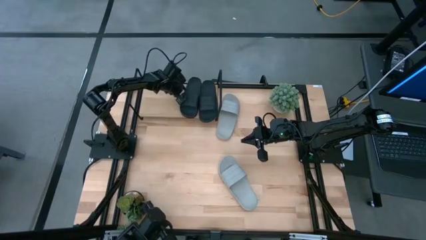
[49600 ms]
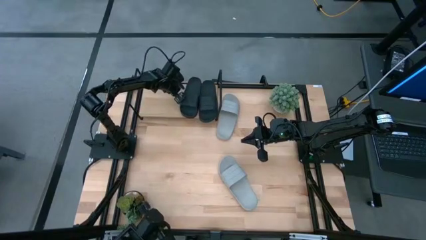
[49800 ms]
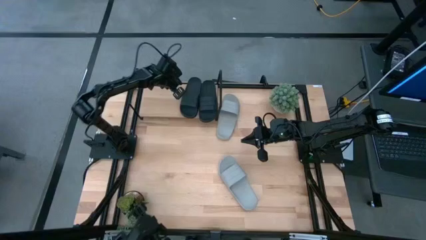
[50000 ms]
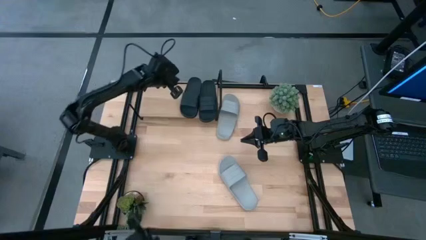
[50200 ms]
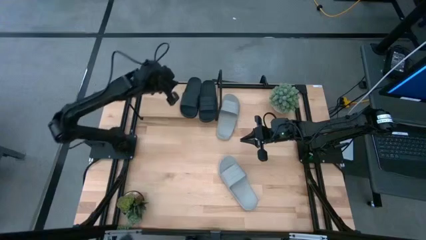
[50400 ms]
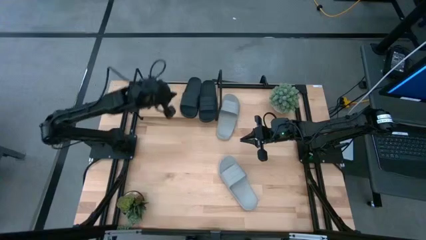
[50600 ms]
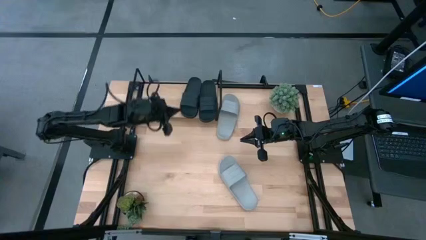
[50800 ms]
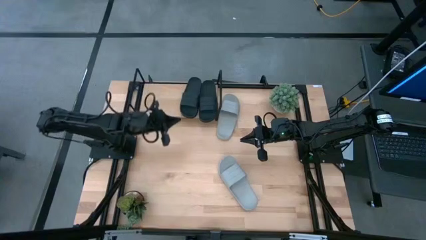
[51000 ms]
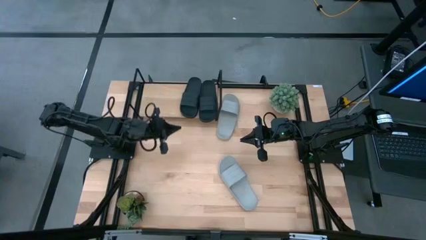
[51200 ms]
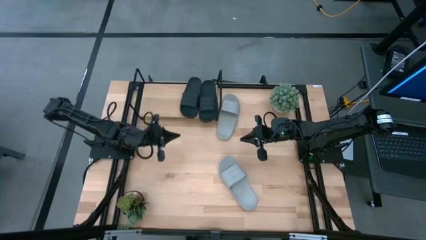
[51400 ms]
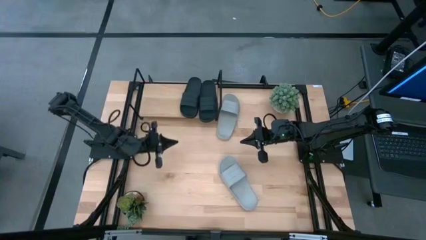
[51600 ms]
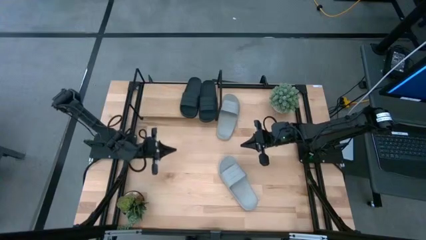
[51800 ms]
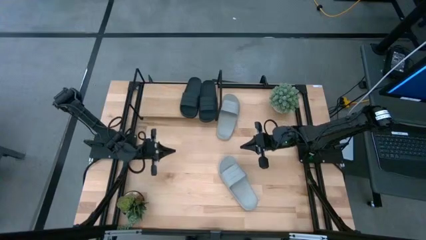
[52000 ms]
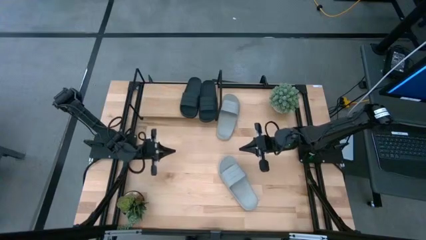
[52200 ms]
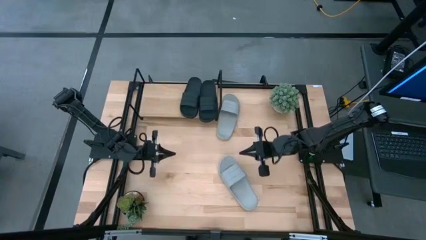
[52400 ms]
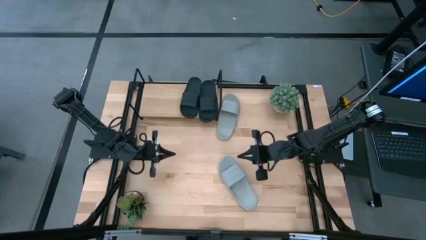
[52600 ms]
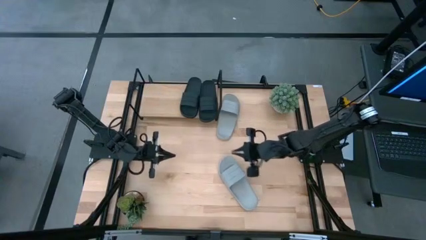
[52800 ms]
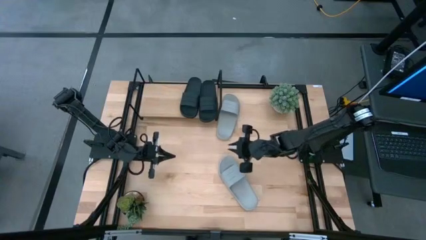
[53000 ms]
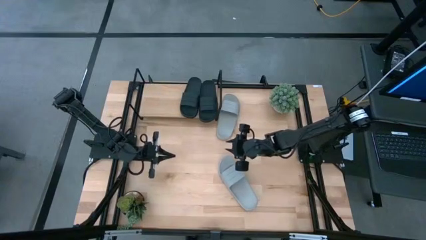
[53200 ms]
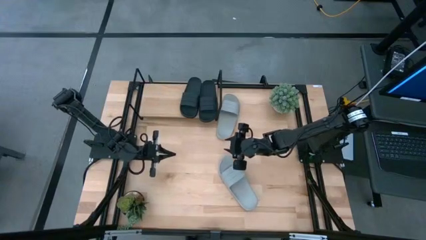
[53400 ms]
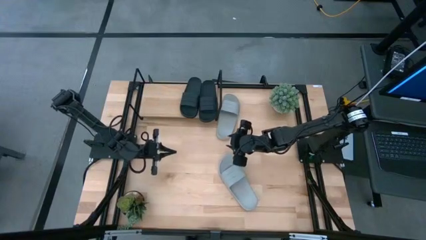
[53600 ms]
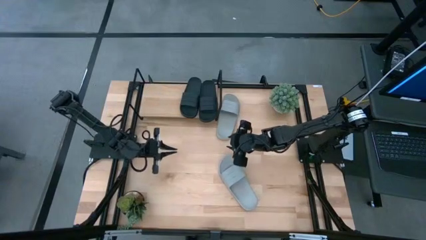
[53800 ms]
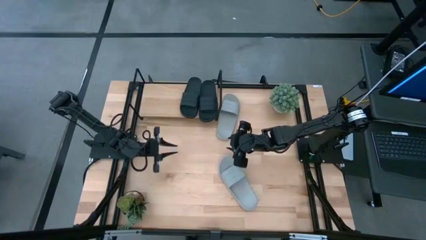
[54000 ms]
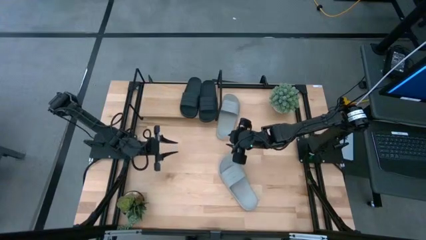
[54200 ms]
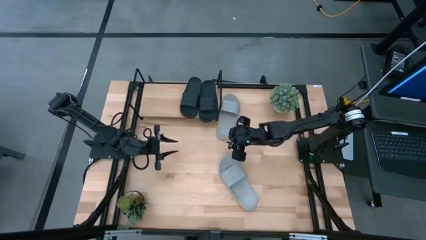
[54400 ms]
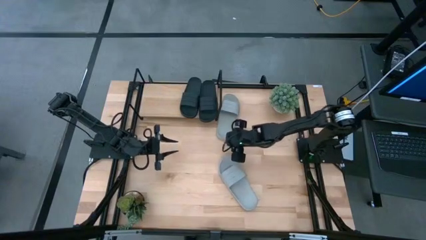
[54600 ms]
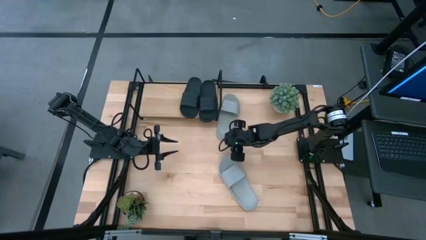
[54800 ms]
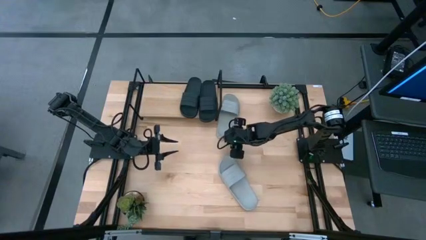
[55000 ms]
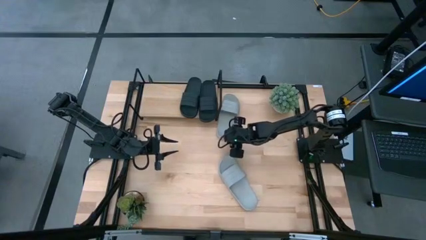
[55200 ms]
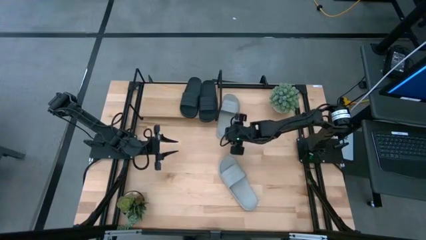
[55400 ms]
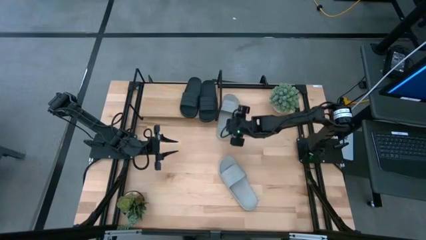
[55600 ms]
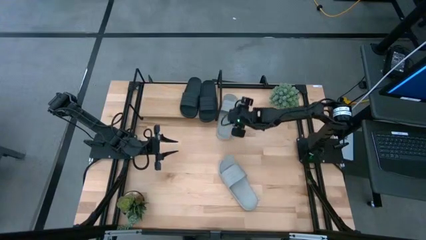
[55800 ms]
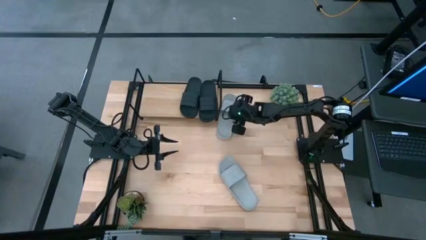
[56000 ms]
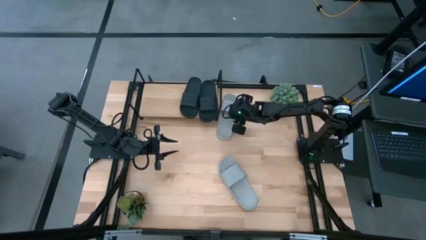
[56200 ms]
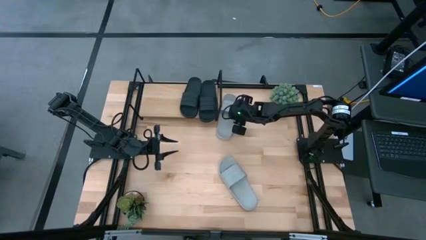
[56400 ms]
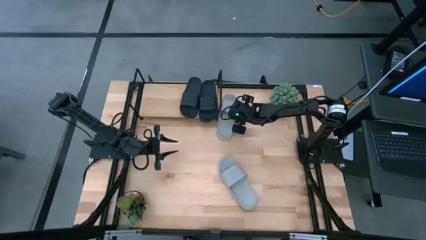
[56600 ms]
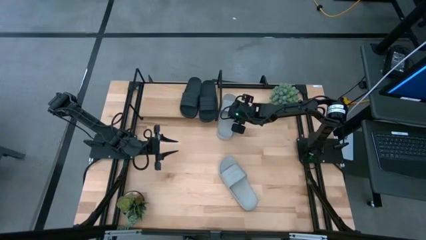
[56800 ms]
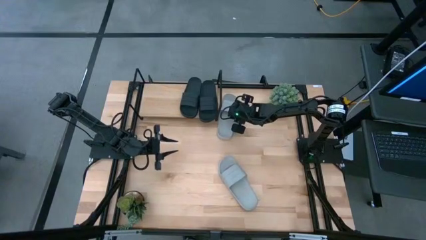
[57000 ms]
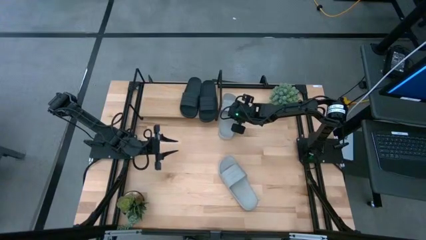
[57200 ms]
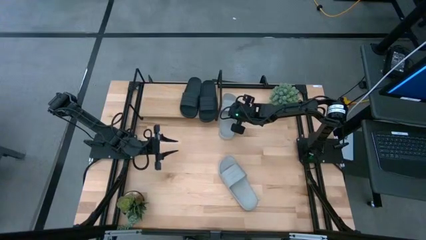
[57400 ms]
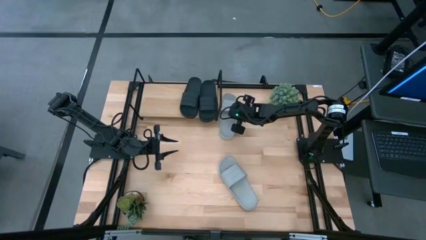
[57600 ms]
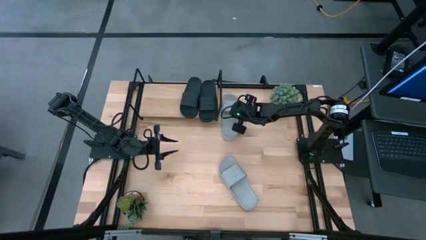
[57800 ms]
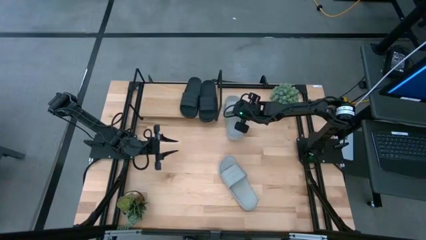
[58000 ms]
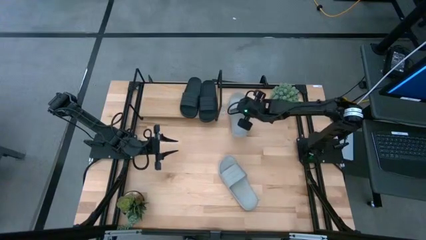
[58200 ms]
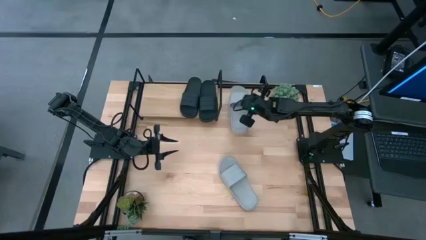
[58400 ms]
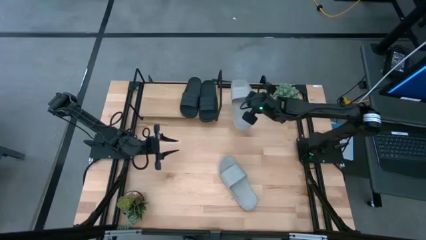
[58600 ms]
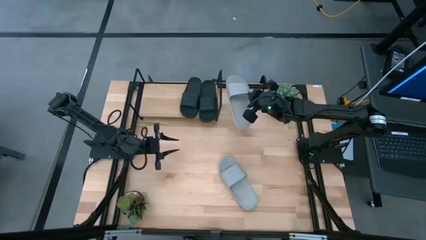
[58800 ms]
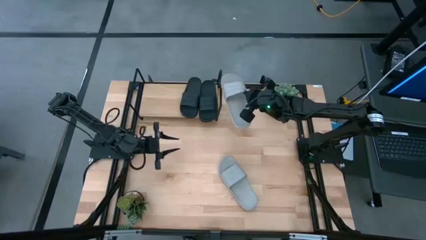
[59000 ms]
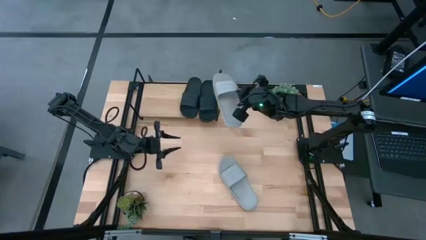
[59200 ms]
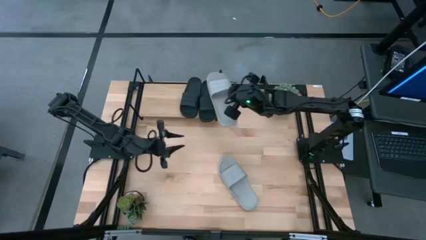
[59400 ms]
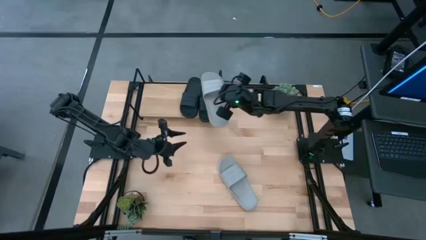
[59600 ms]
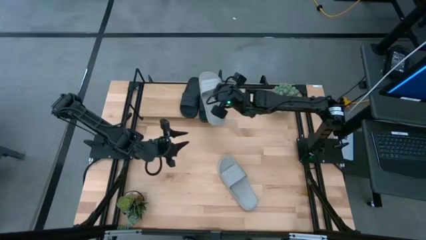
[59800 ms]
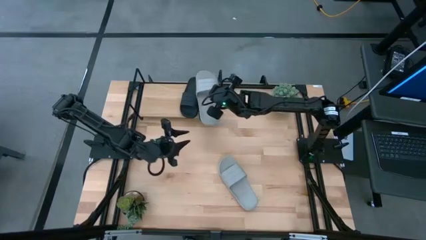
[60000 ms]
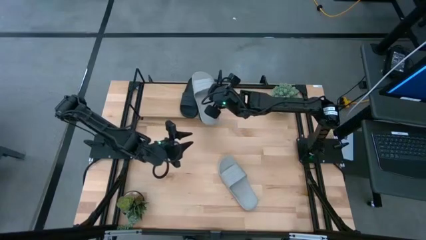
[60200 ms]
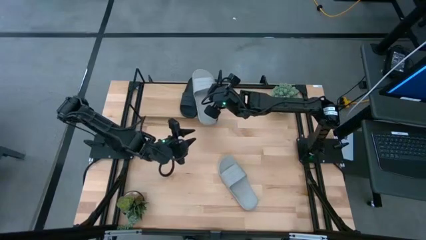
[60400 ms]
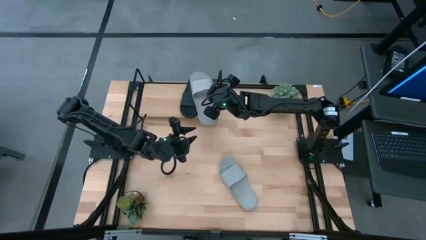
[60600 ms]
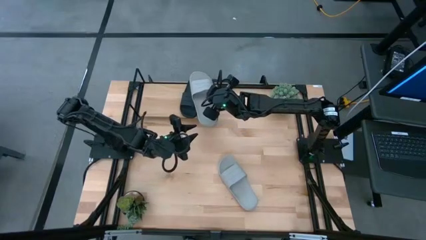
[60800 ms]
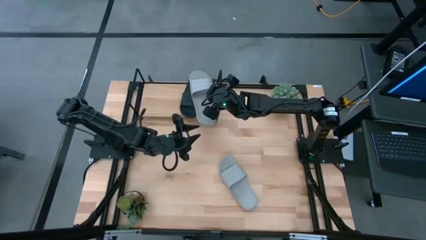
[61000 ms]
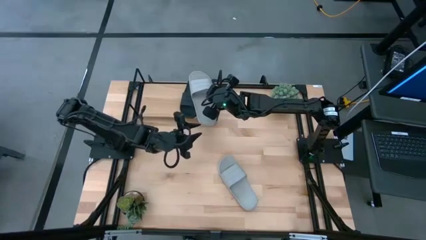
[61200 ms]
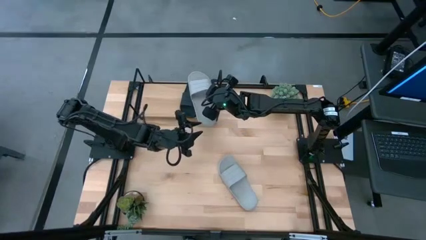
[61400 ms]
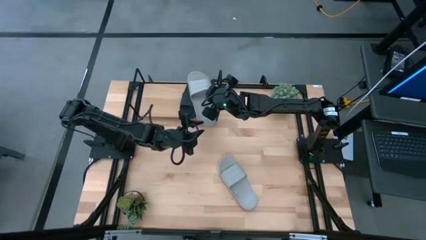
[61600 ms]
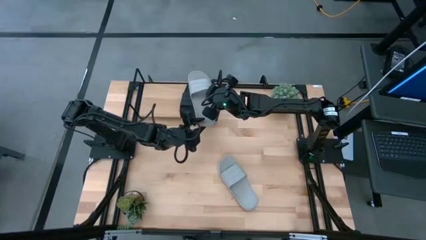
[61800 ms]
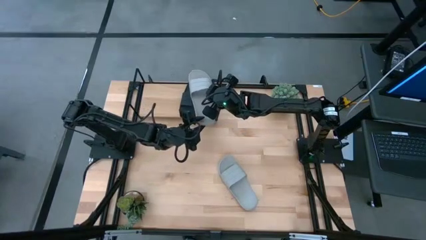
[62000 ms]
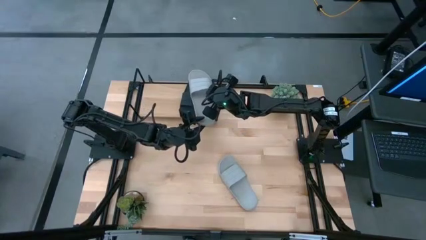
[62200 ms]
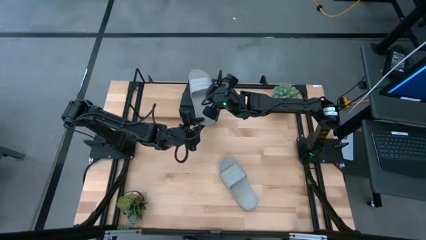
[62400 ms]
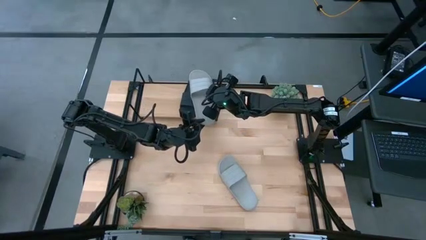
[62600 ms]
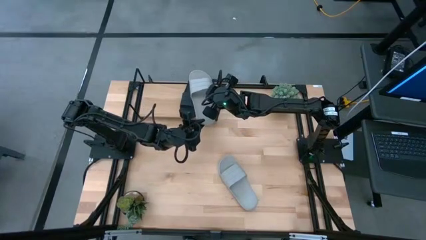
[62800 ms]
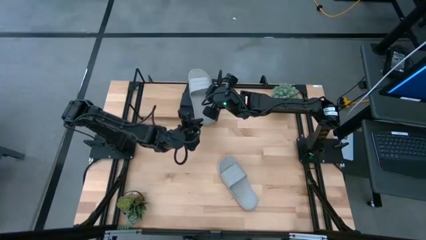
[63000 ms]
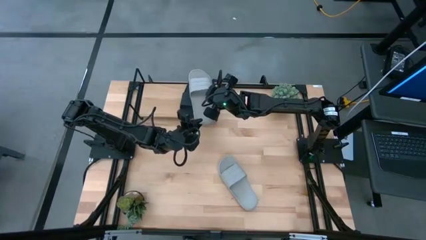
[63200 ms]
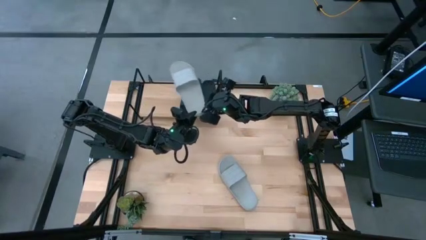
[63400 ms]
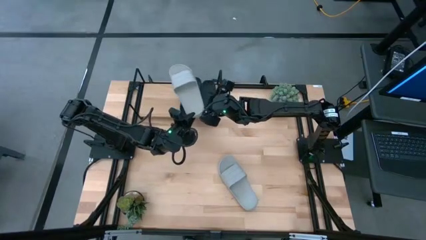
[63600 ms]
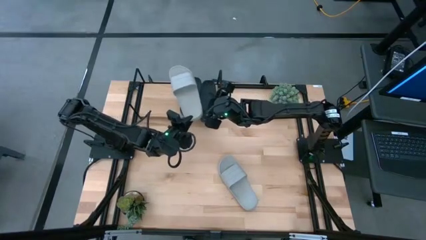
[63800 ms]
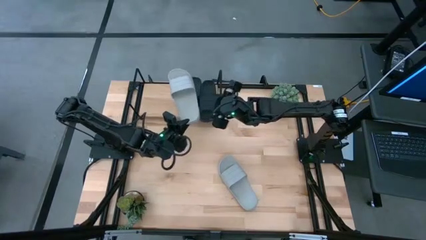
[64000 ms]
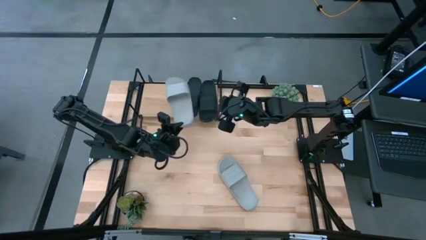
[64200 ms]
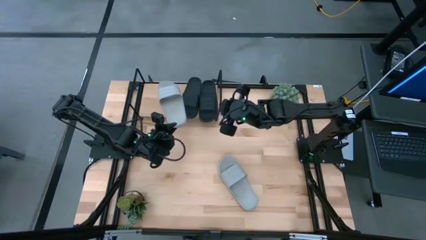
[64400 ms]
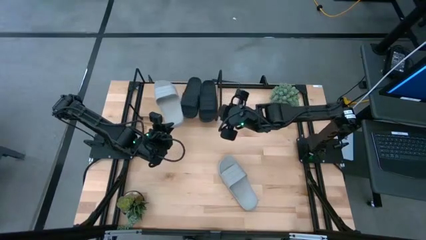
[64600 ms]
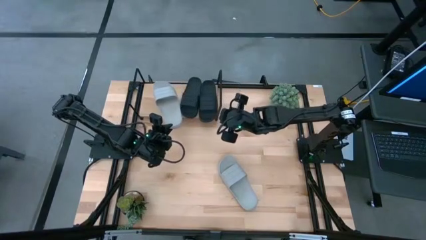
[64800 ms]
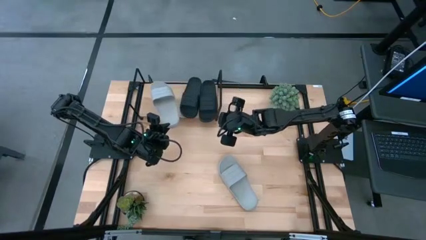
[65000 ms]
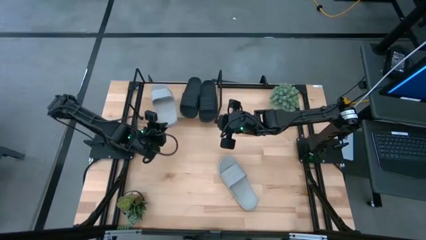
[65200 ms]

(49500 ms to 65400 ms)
Task: Pick and place slides into the shelf
Put the top gray slides on the shelf

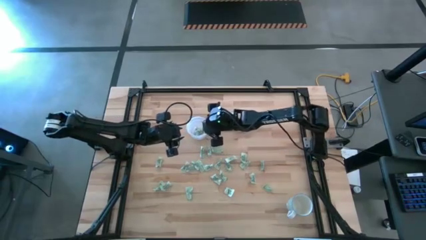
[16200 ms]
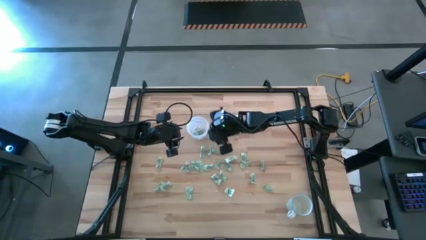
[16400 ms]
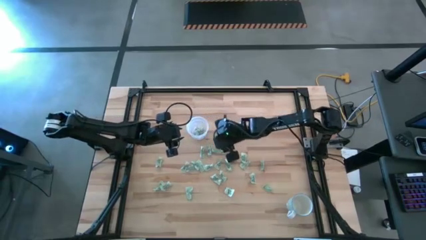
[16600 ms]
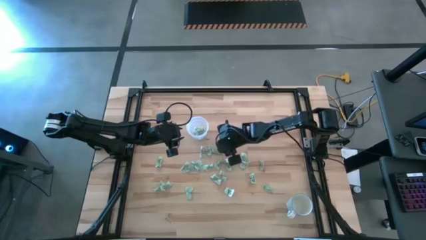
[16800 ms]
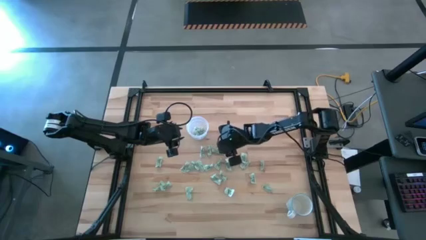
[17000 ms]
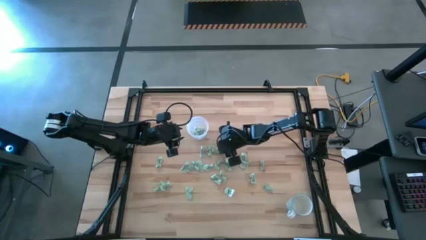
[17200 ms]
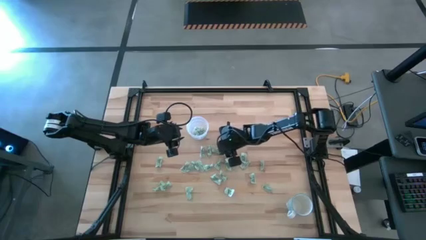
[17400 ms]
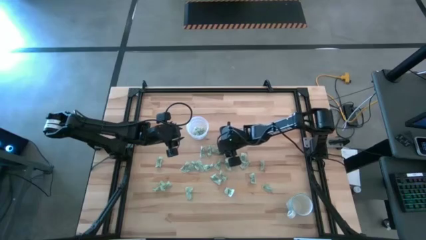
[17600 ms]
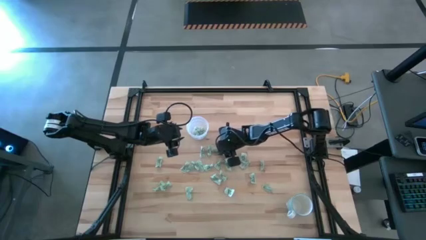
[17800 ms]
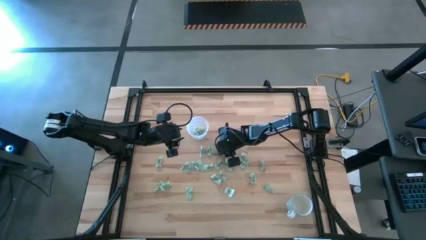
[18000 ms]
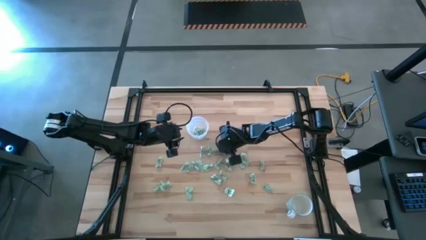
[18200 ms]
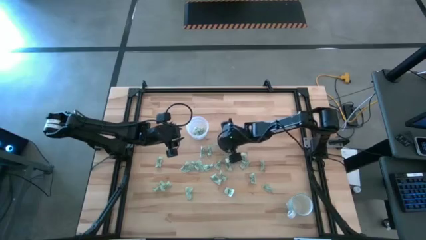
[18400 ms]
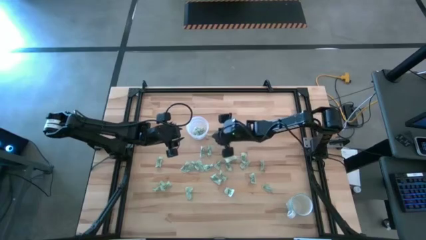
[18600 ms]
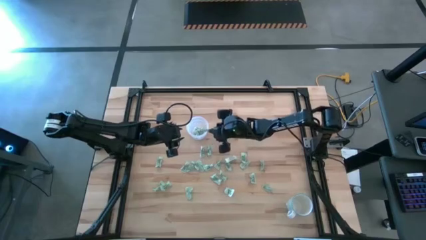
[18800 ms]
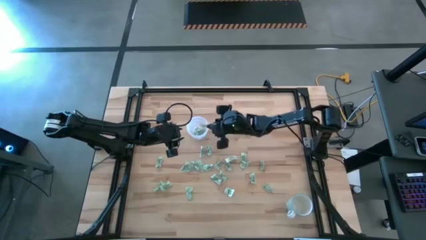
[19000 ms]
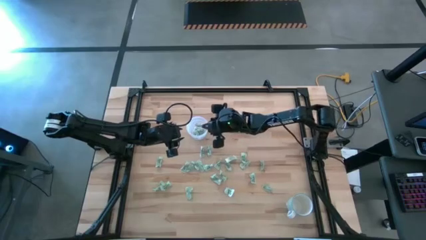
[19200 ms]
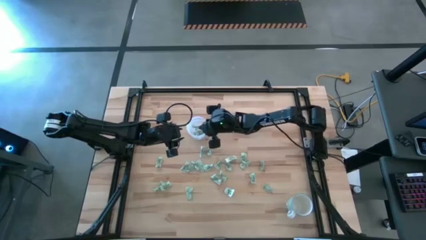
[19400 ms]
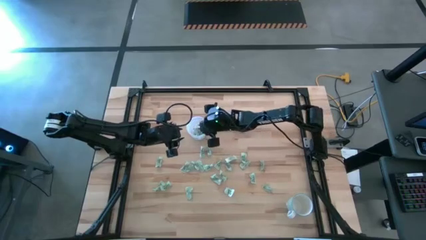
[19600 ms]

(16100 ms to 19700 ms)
Task: Pick and place Stevia / Truvia into bins
Put the stevia packet into the transparent container
